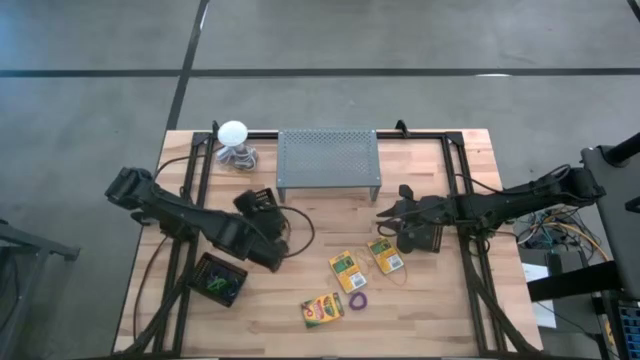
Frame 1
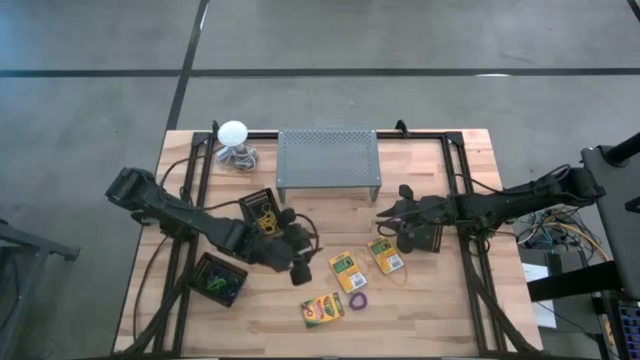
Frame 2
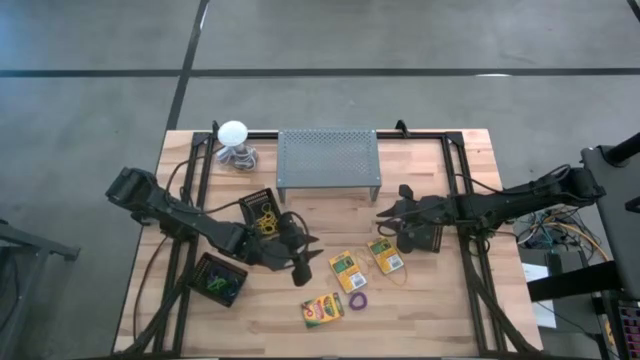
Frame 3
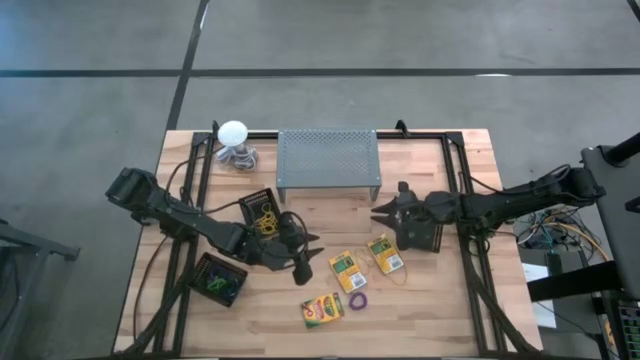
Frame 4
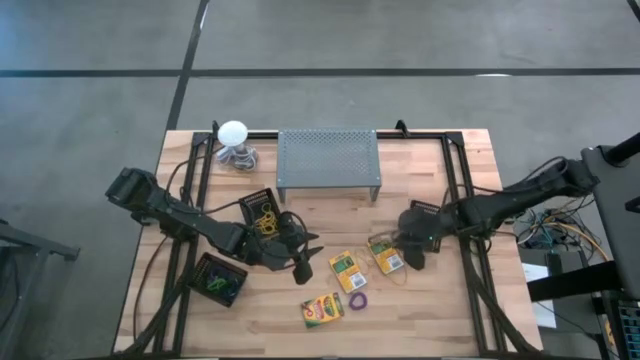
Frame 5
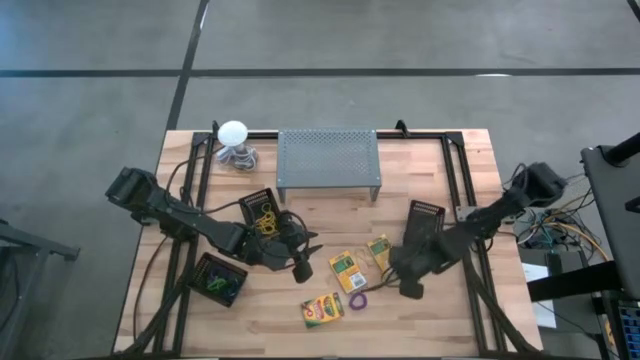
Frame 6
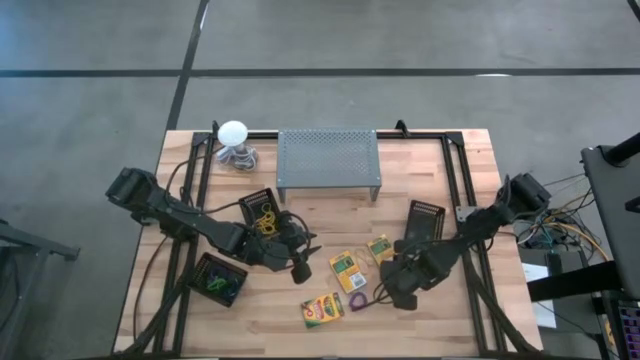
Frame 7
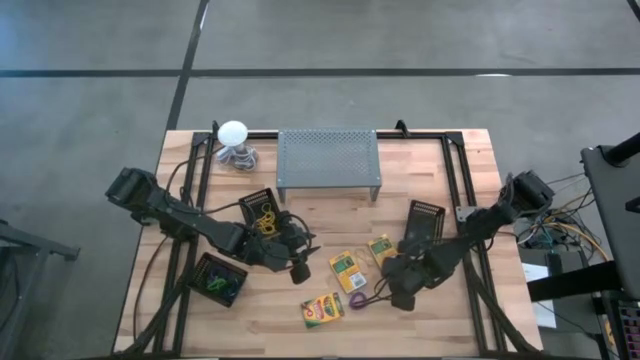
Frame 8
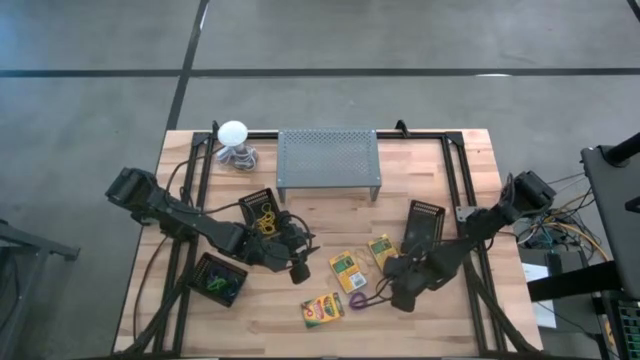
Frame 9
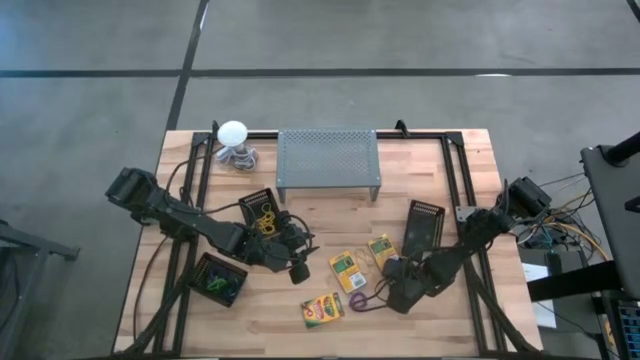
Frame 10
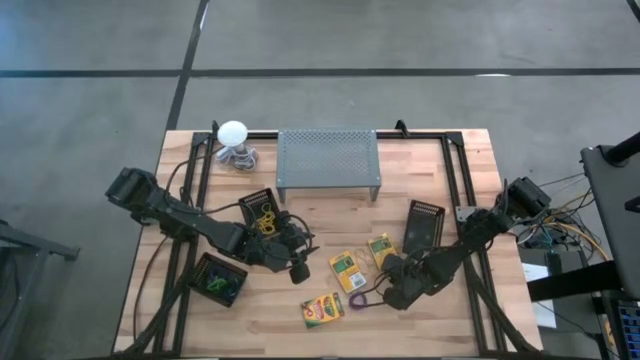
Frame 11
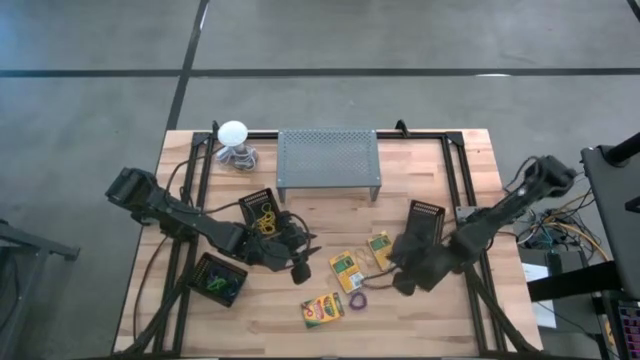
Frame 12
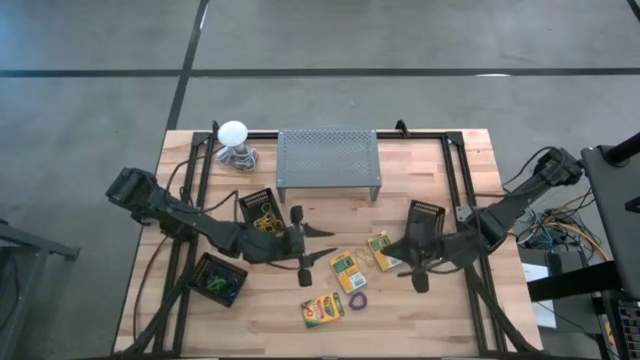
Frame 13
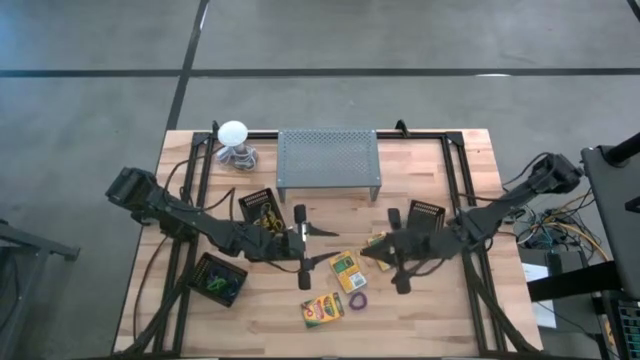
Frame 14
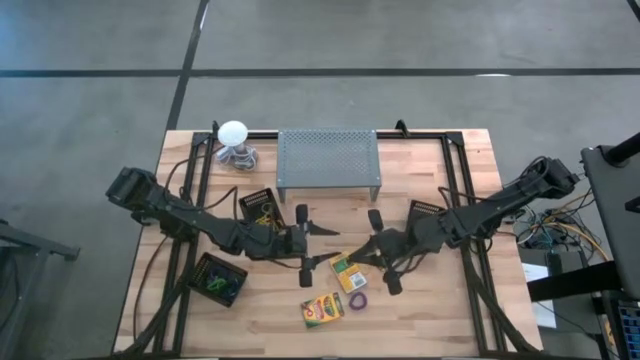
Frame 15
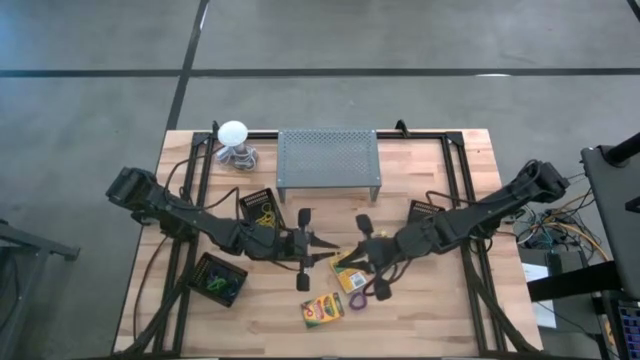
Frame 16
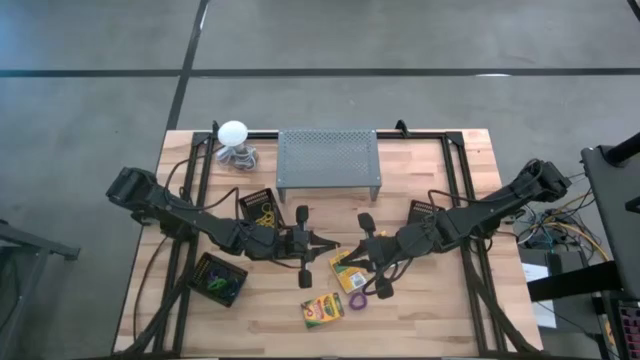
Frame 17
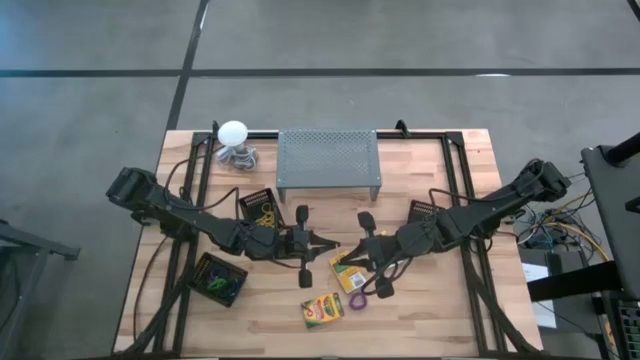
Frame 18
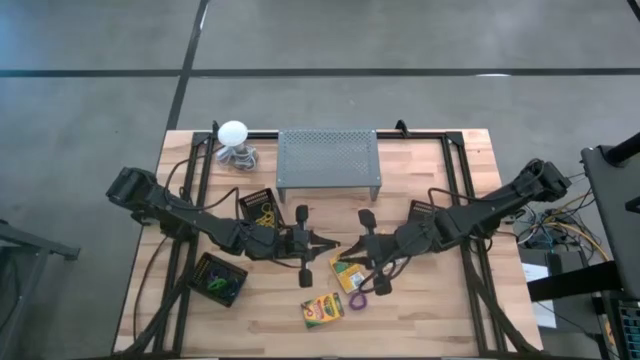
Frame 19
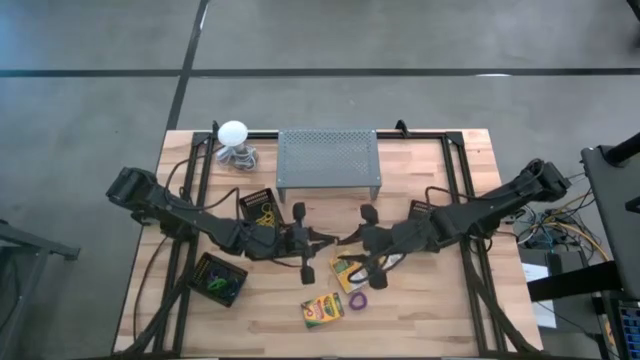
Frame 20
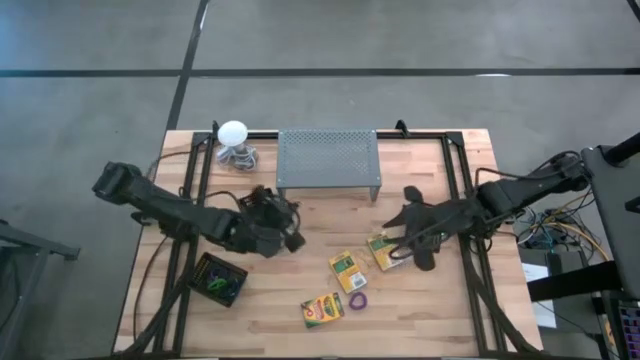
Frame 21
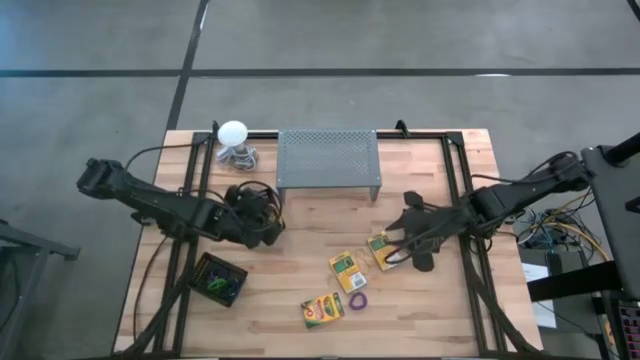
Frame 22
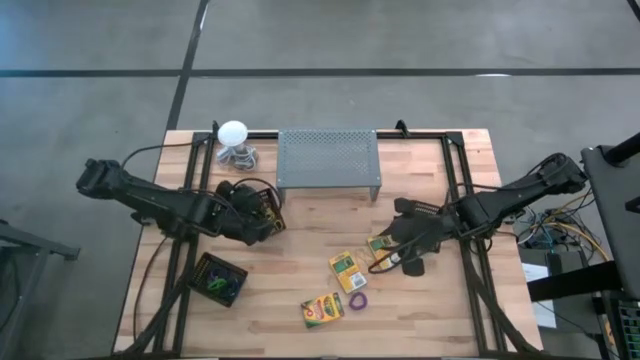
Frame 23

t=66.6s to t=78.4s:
Task: Pick & Place Office Desk Supplies
Put the yellow rubber band into the top left black bin

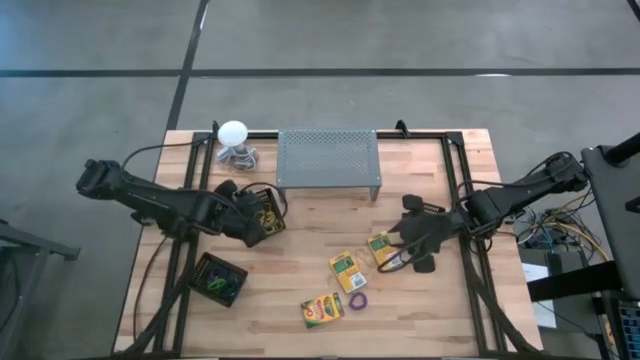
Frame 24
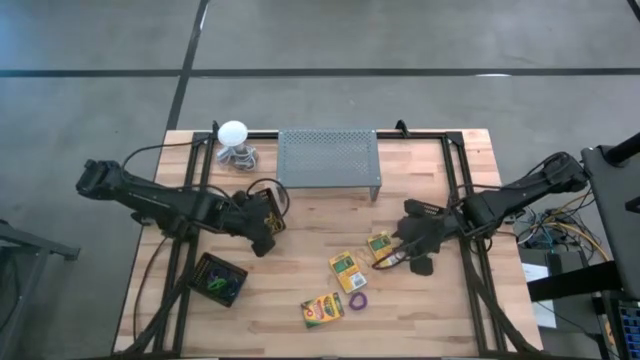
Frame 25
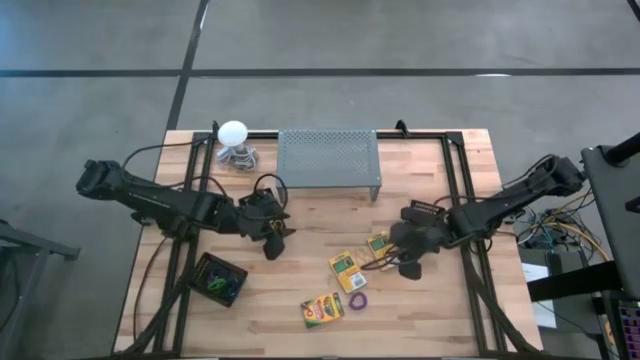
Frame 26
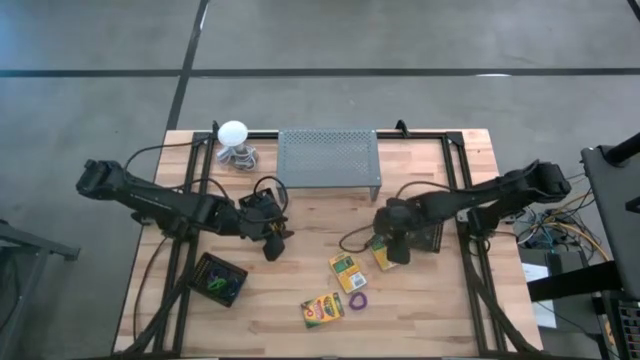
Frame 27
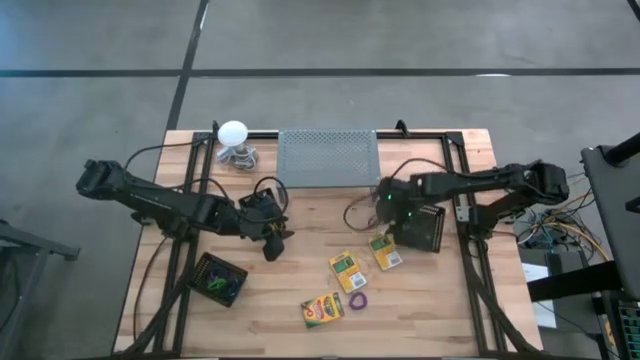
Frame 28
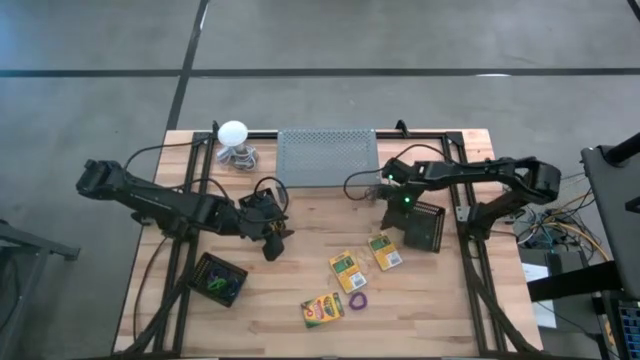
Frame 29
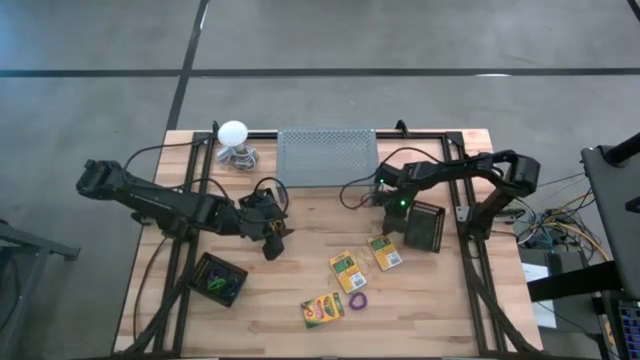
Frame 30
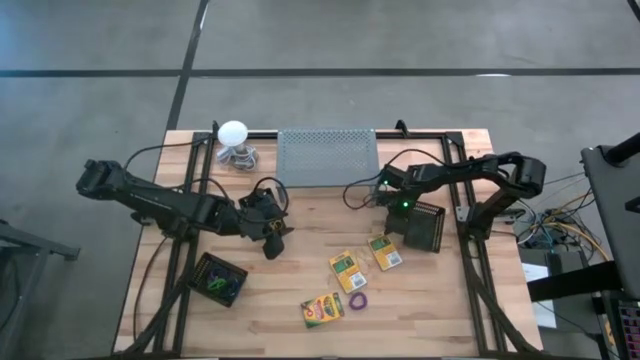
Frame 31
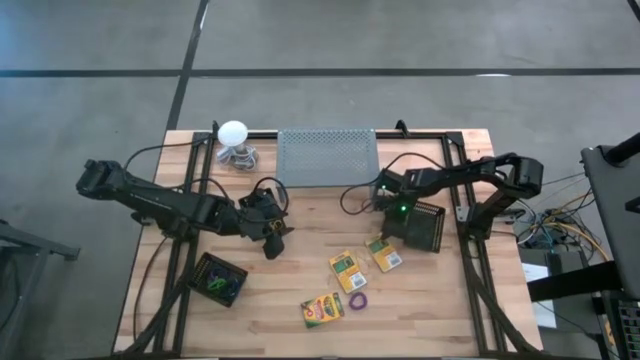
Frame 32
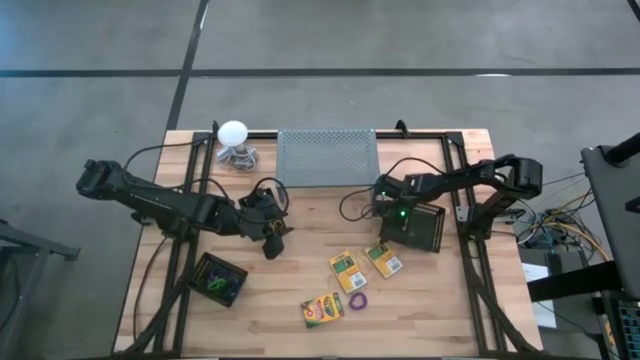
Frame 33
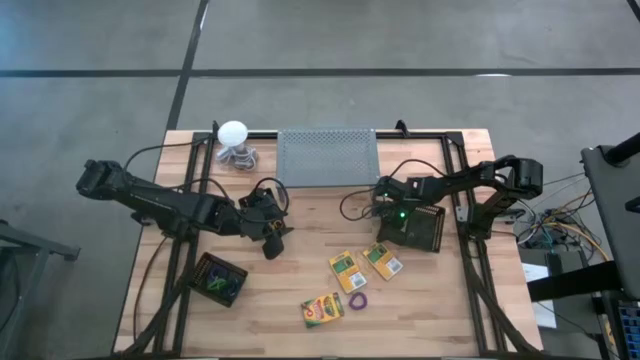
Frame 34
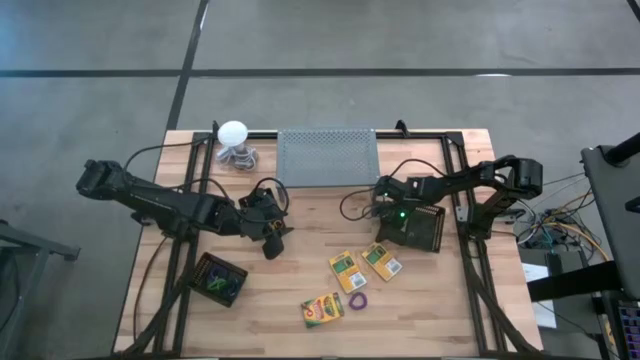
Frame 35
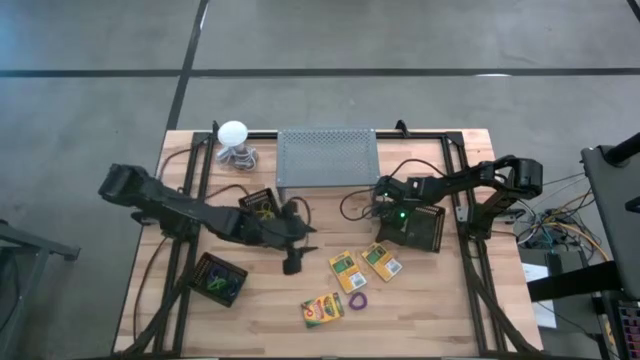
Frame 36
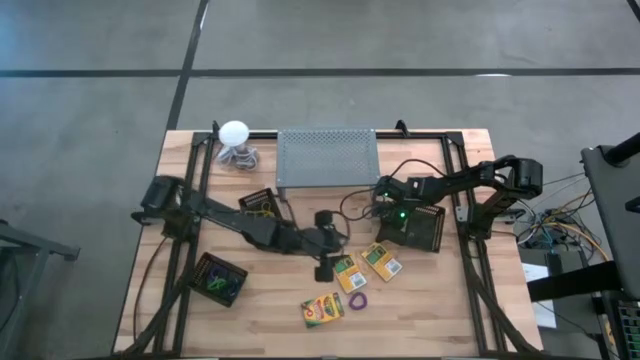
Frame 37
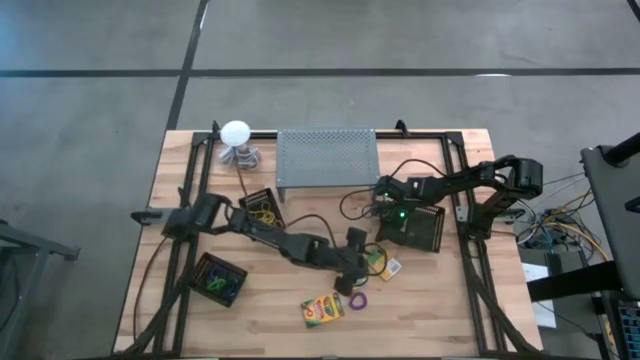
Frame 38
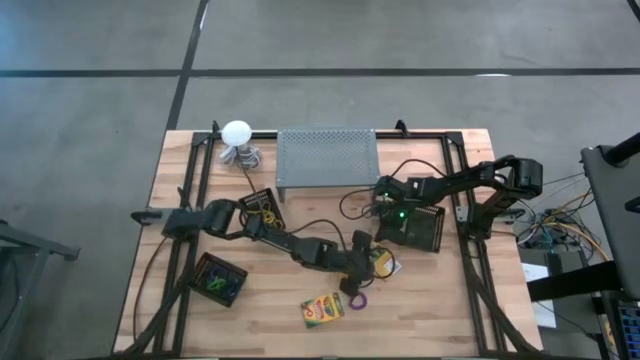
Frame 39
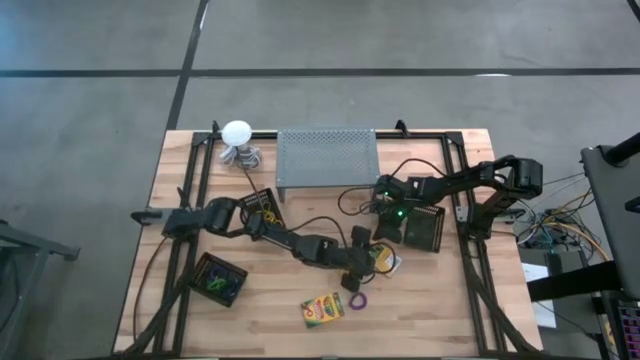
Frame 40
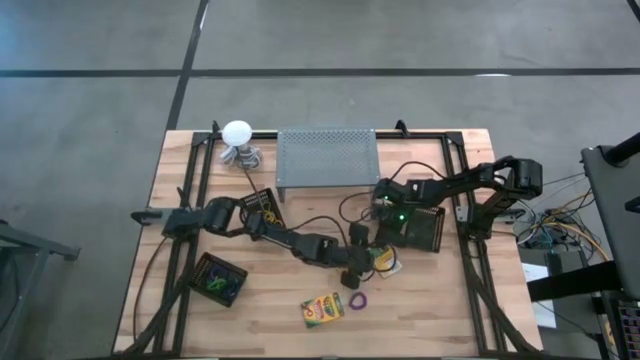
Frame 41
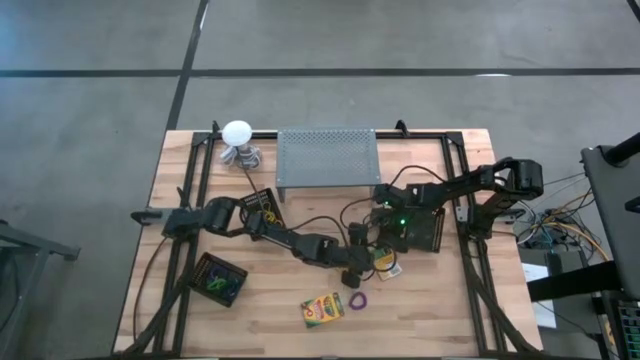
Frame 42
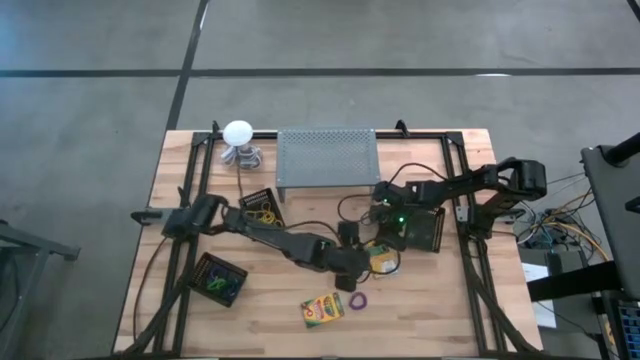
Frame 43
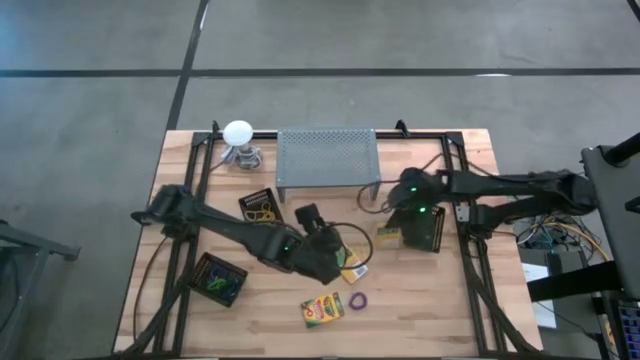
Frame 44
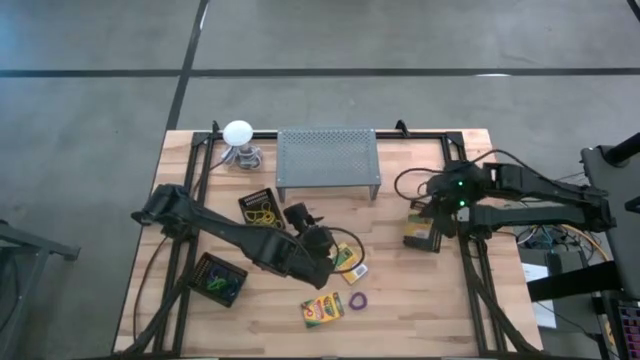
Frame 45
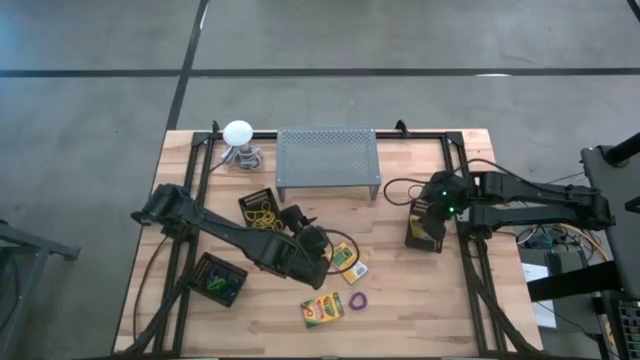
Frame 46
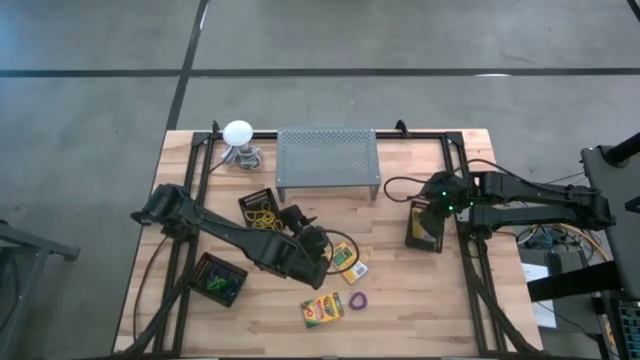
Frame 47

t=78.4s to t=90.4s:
Put the crayon box into the top right black bin
